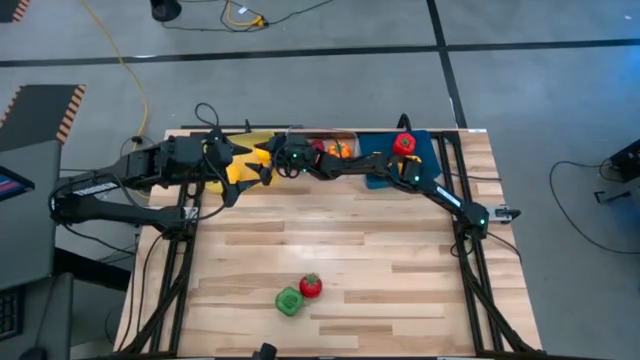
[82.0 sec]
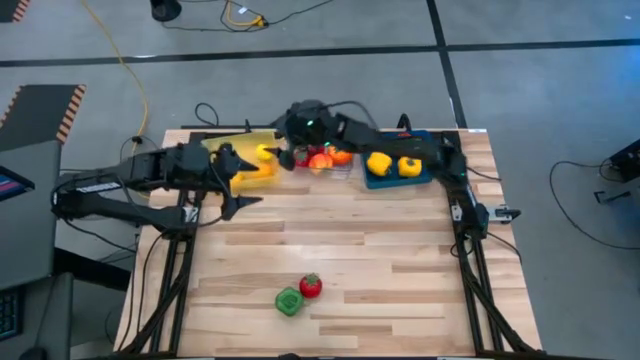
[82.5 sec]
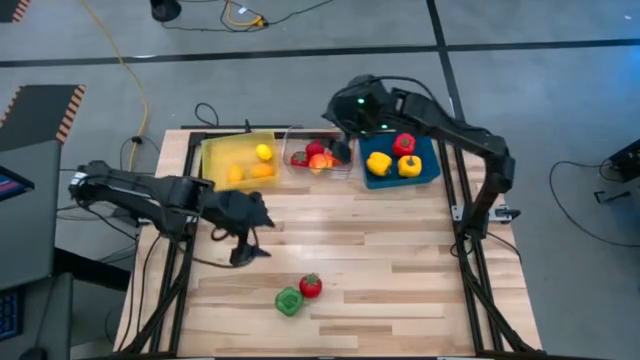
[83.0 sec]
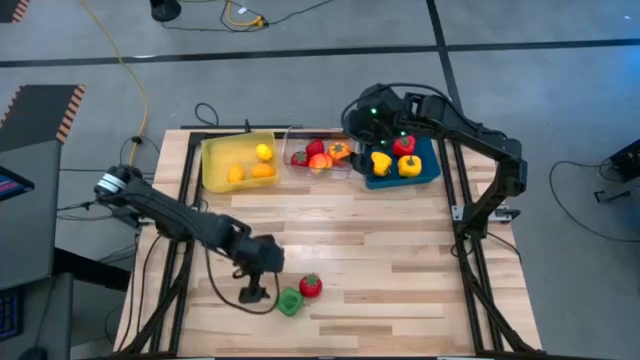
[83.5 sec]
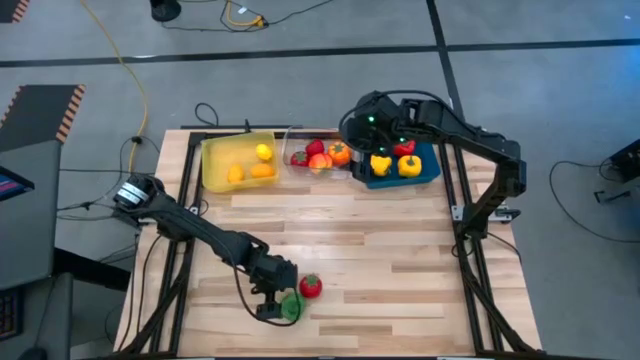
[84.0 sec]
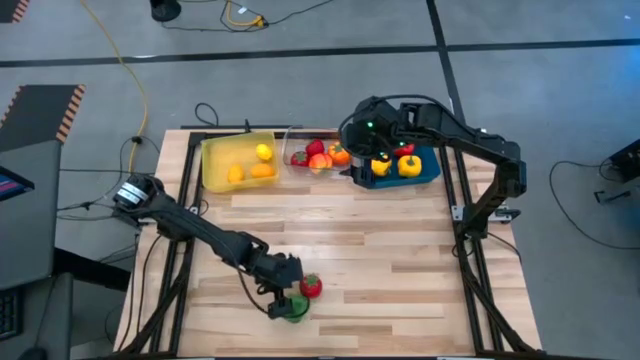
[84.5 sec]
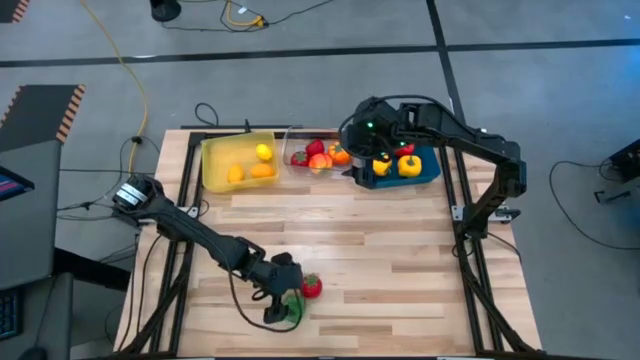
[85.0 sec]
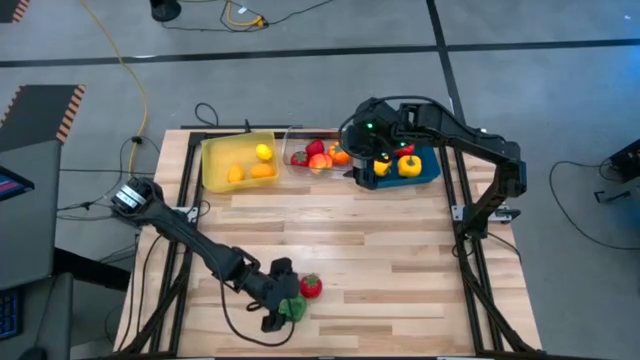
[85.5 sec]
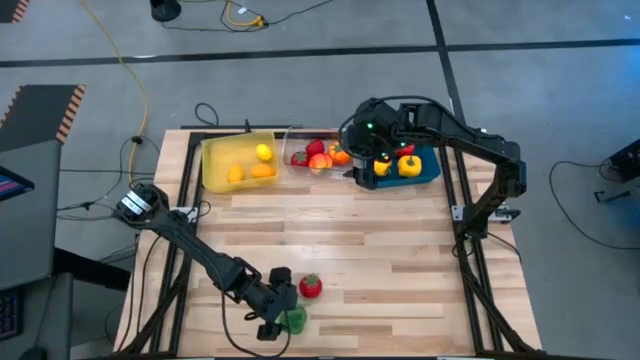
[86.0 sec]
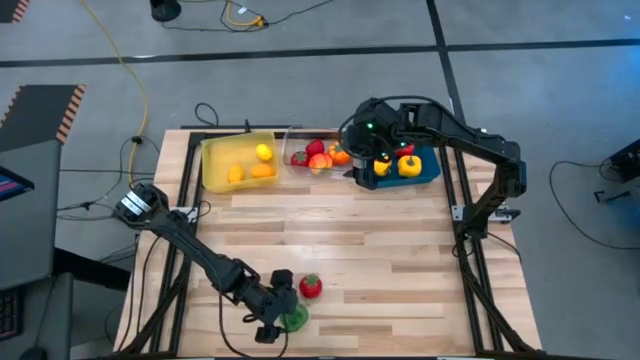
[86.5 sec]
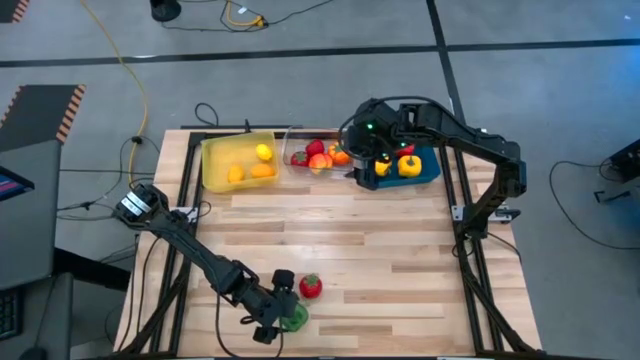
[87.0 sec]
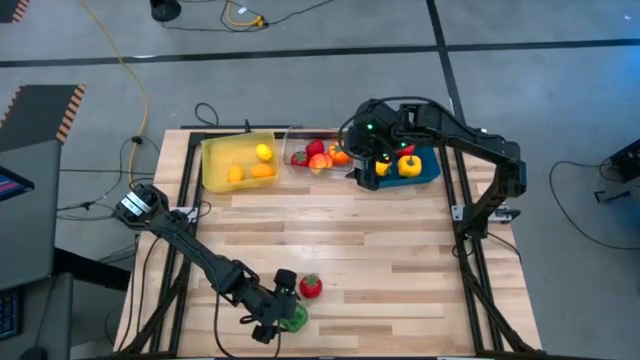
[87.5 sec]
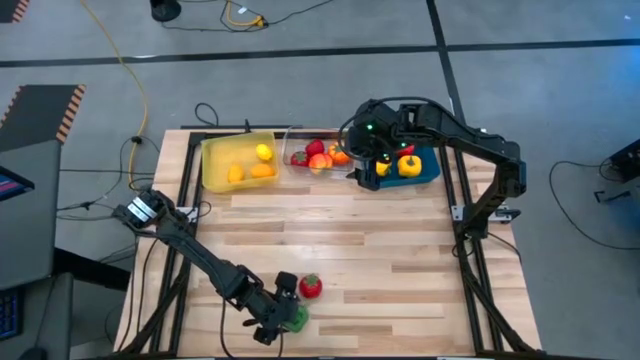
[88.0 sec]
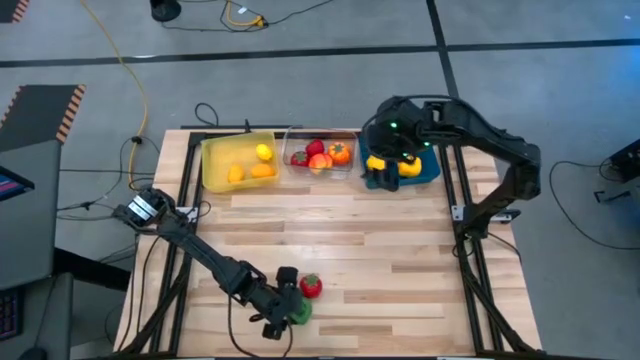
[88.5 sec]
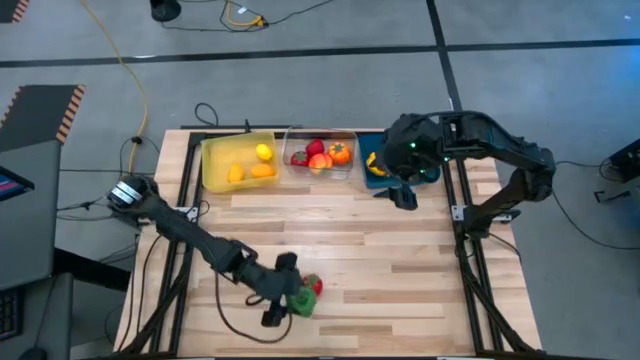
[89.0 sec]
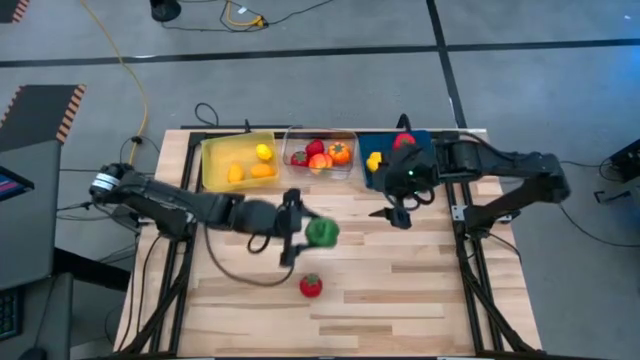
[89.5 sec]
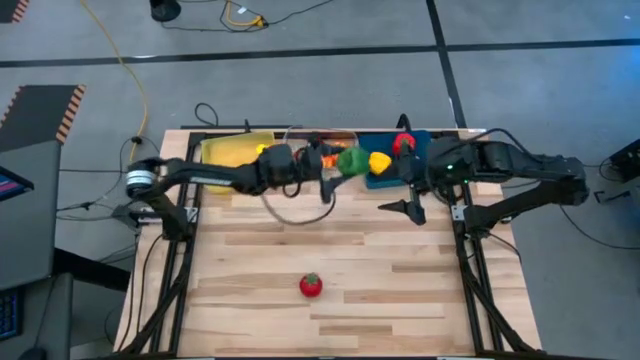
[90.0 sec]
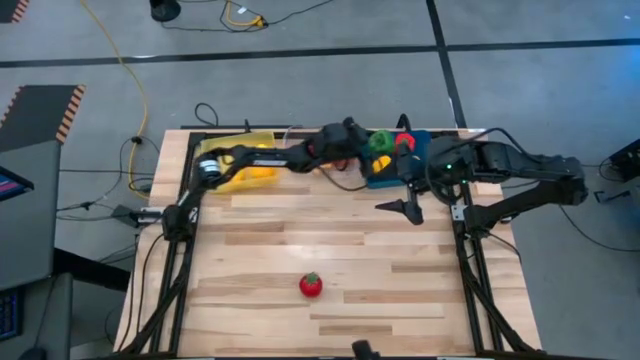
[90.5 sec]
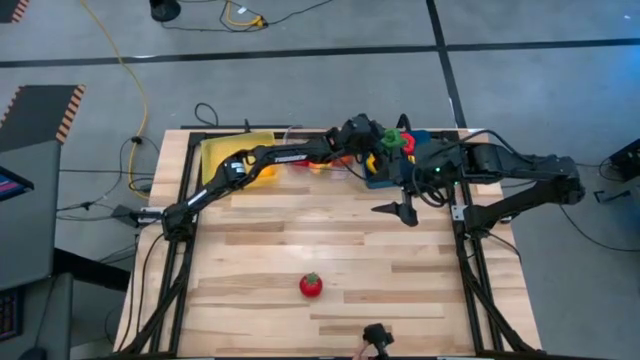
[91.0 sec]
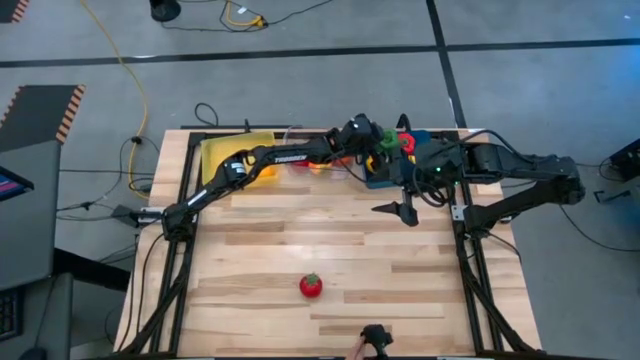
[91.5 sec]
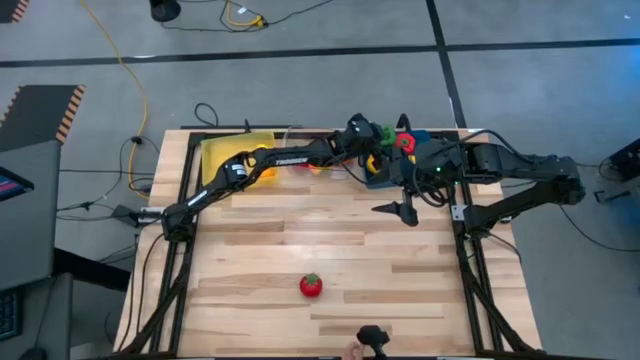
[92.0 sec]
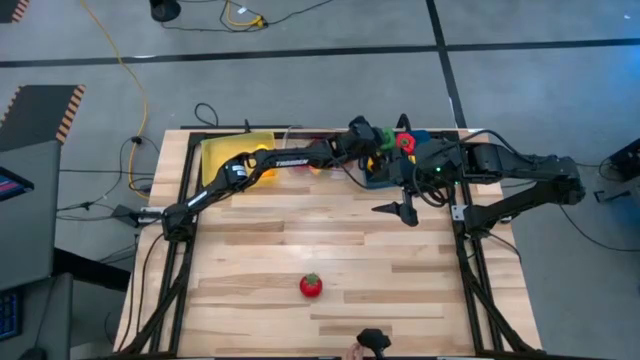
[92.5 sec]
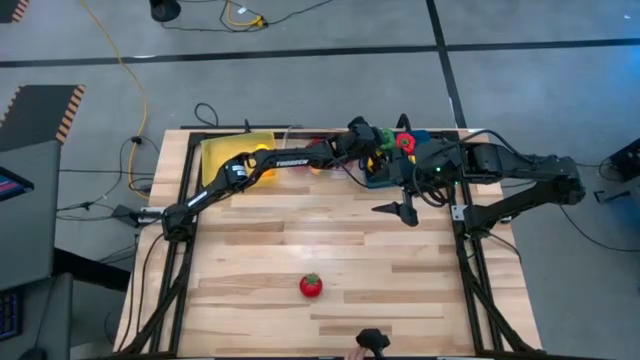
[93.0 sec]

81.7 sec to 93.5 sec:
Task: Sort produce into baskets
Put the green bell pepper into the blue bin

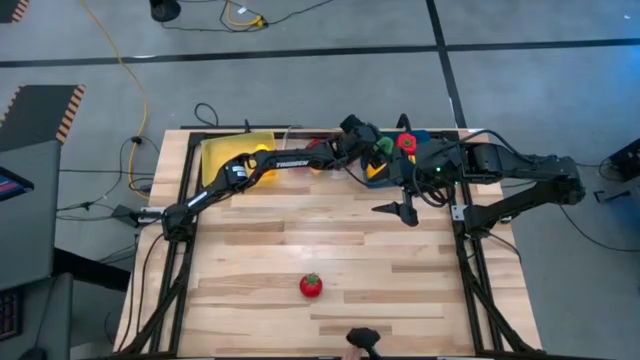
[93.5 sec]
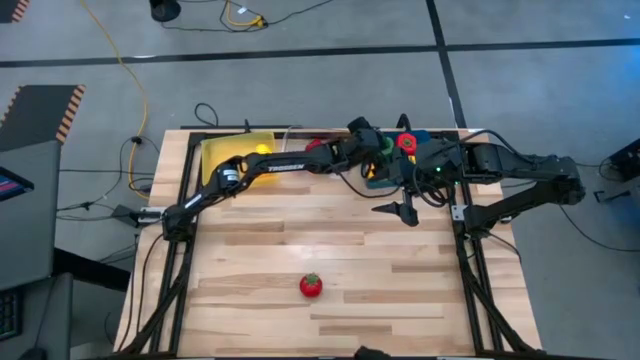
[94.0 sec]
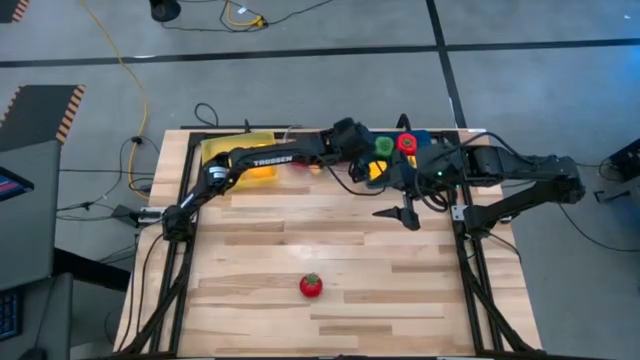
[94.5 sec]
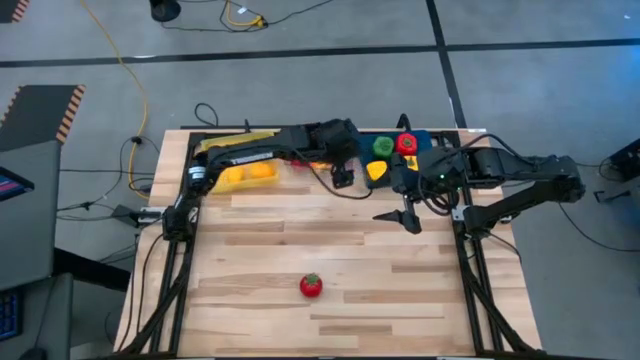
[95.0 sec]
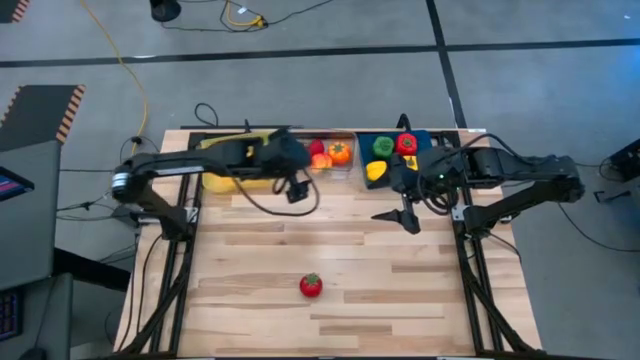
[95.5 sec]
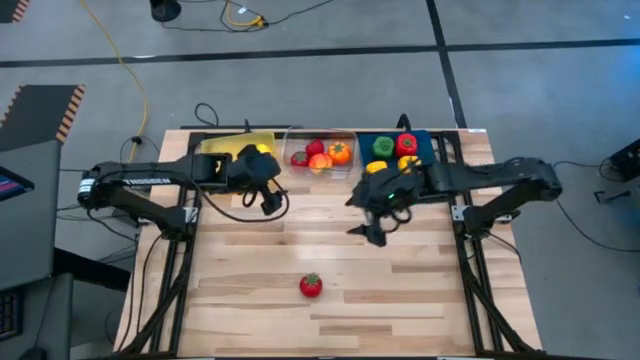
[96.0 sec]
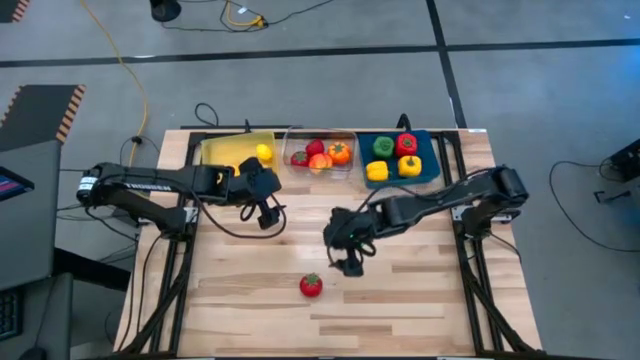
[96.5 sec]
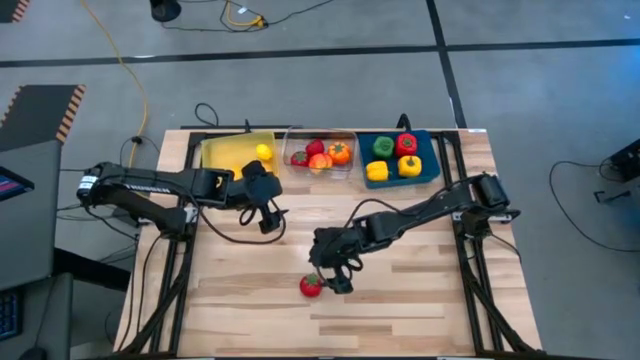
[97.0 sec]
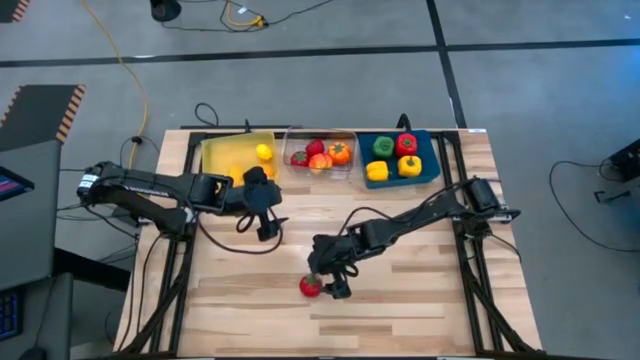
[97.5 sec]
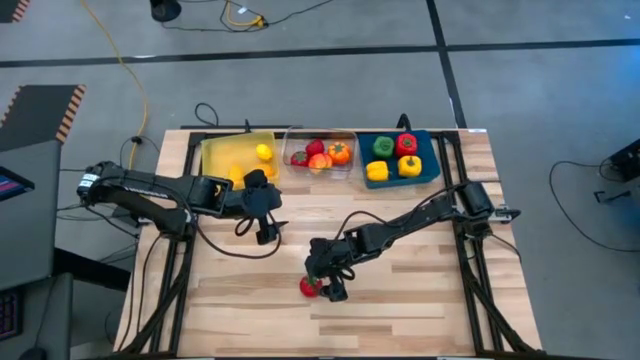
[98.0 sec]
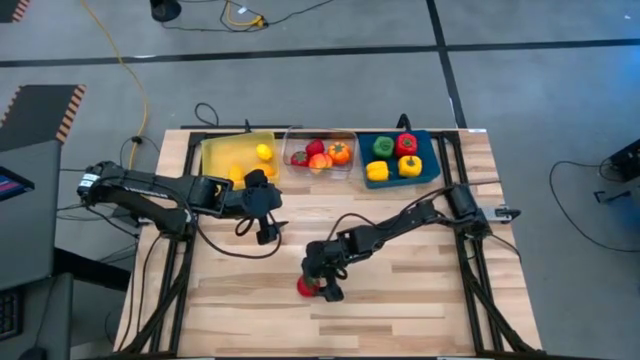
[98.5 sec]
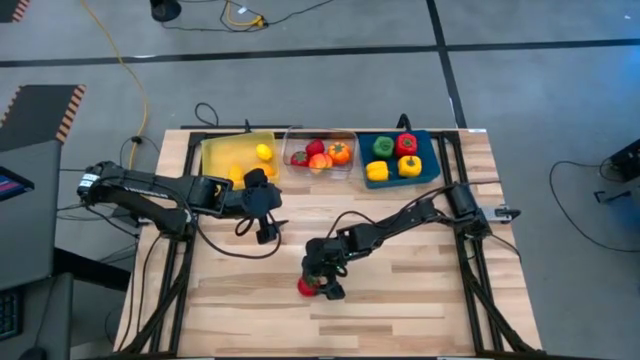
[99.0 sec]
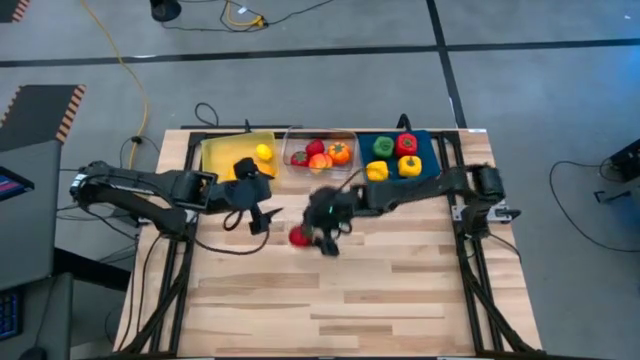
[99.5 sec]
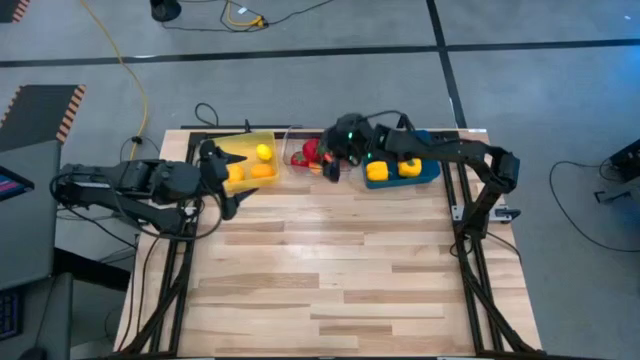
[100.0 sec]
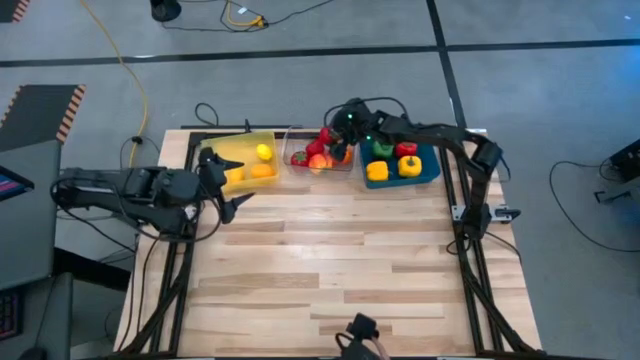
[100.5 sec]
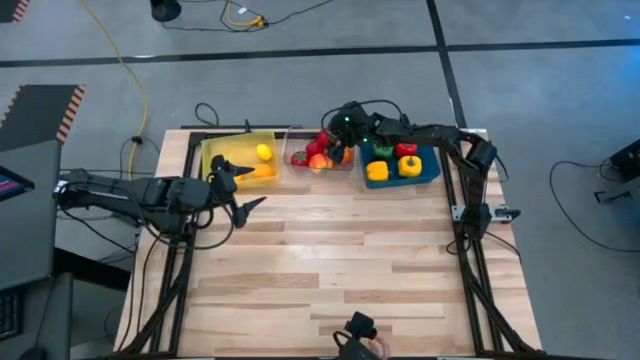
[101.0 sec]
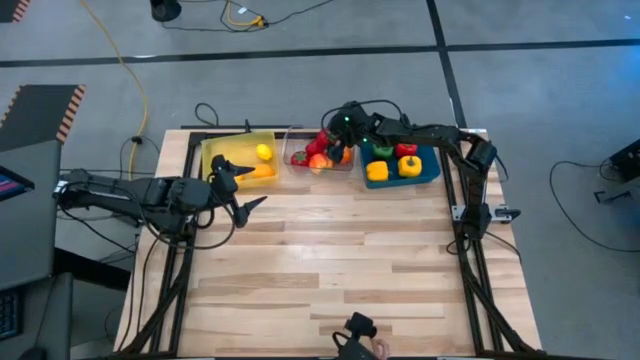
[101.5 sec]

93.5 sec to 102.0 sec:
Put the red tomato into the transparent bin
